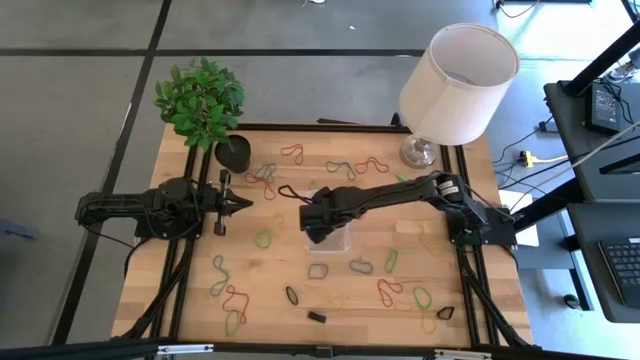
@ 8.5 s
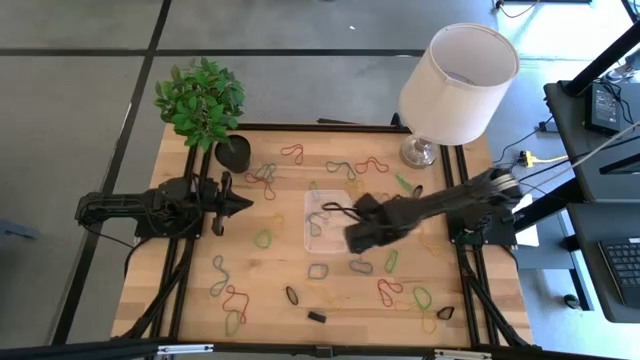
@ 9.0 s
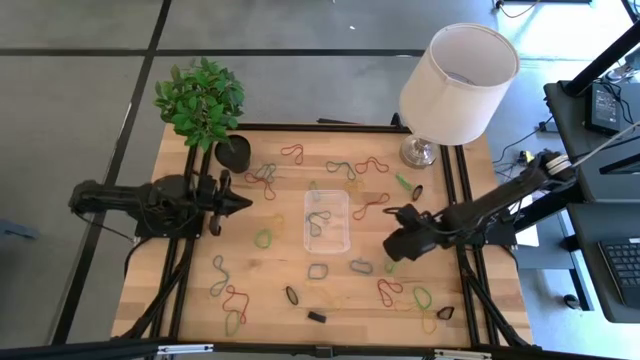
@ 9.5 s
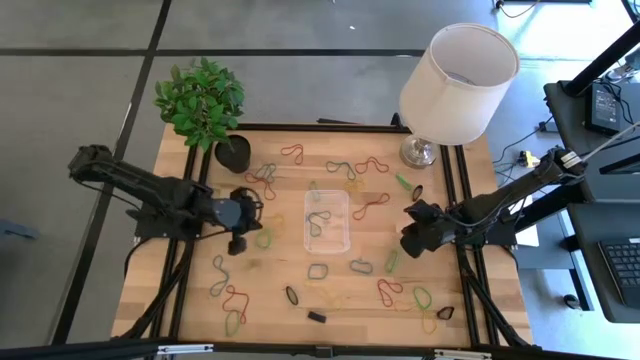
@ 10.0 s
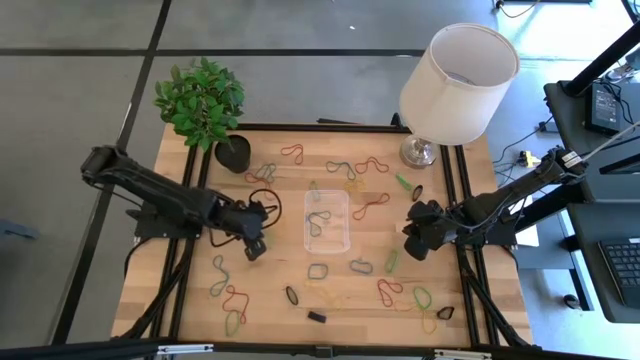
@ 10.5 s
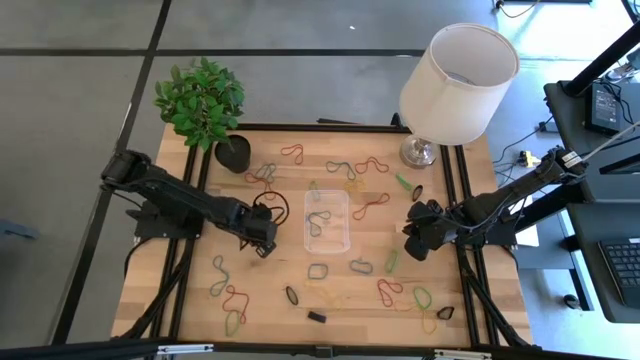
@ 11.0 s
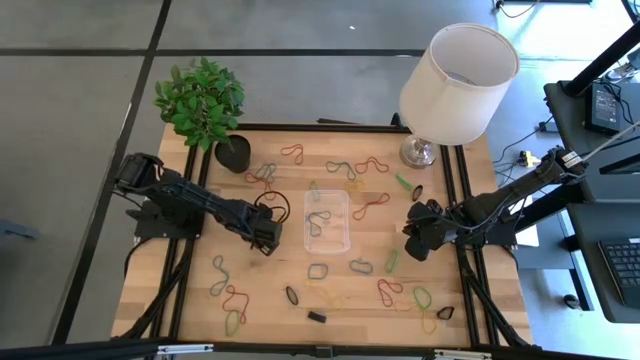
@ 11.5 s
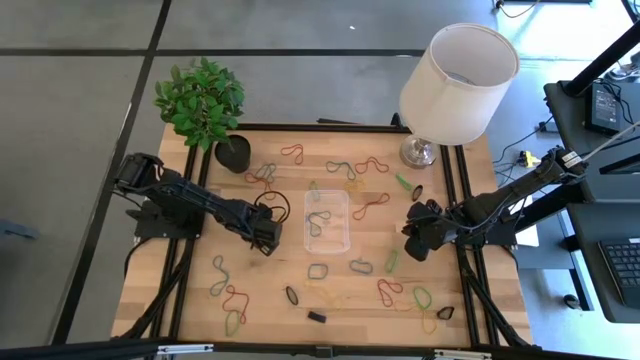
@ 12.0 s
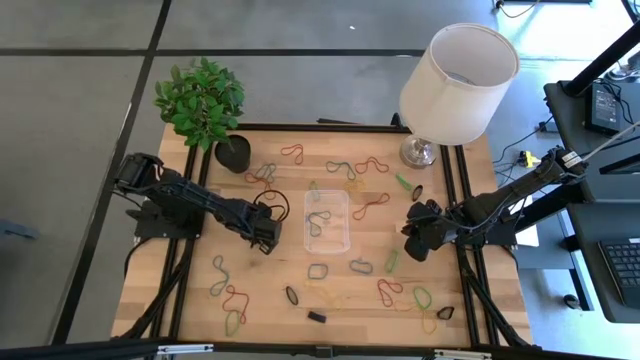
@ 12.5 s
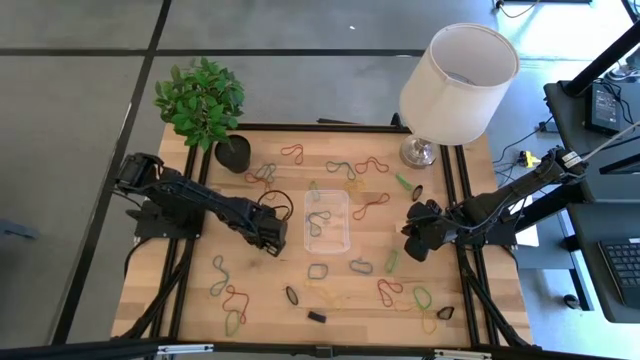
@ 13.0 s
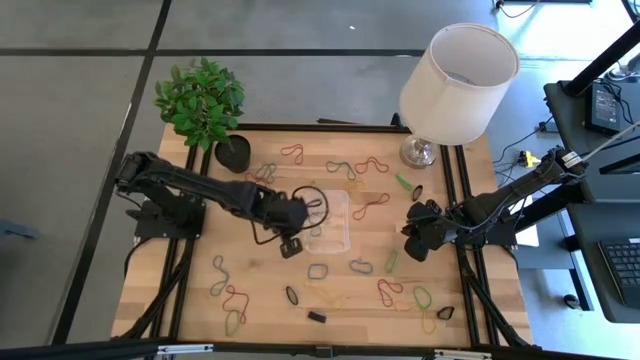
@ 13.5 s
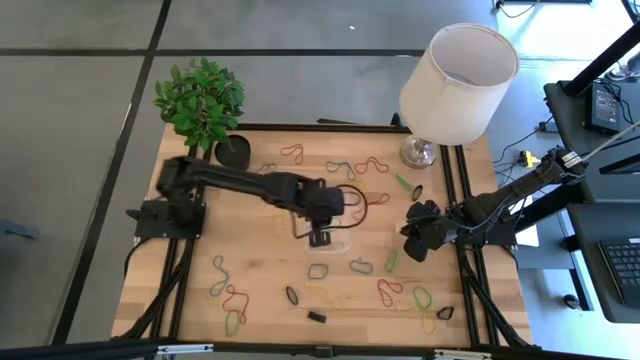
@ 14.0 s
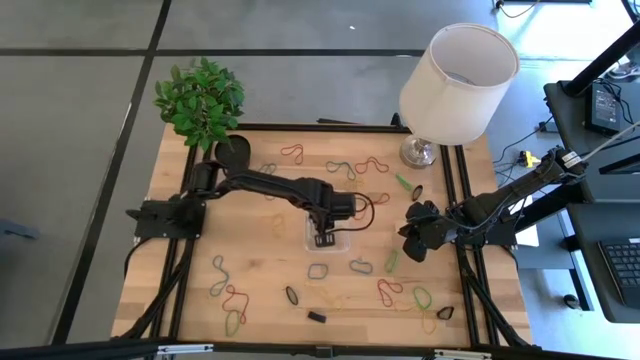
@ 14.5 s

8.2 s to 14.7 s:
Task: Pick and place rubber bands into bin
Put the green rubber band into the transparent container

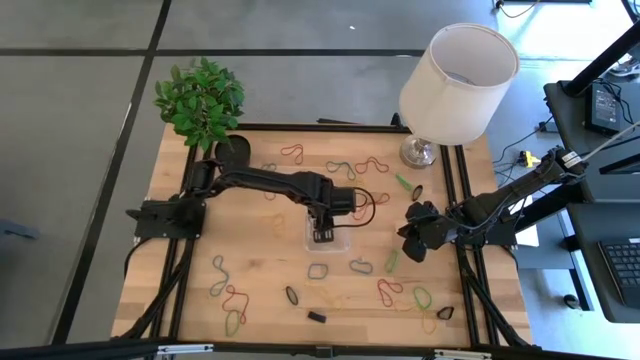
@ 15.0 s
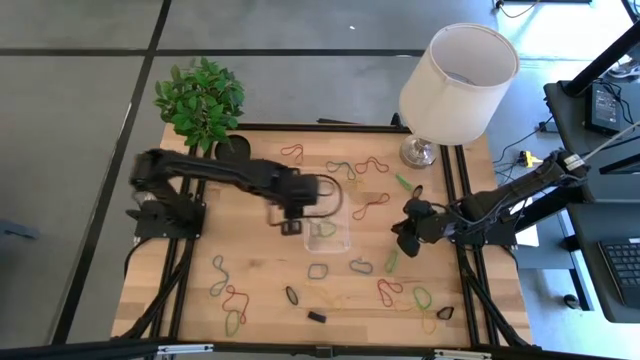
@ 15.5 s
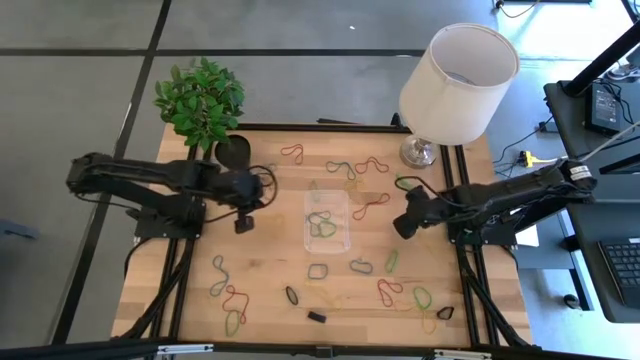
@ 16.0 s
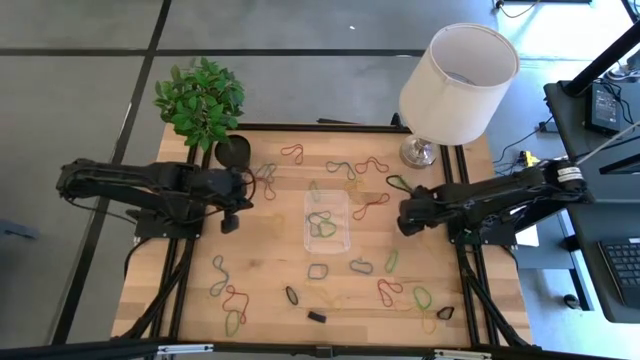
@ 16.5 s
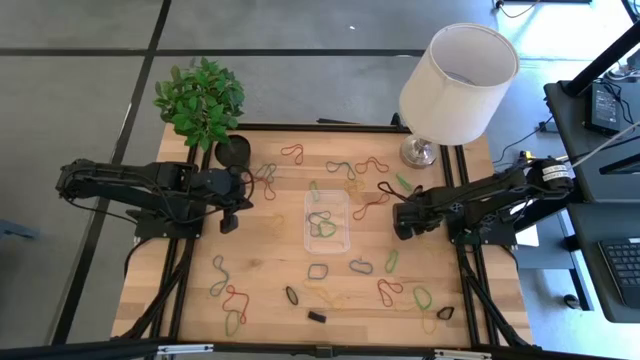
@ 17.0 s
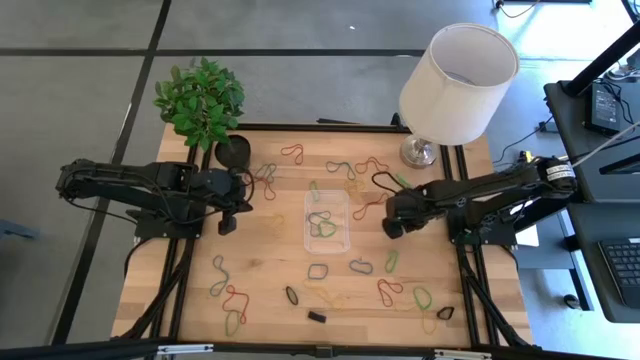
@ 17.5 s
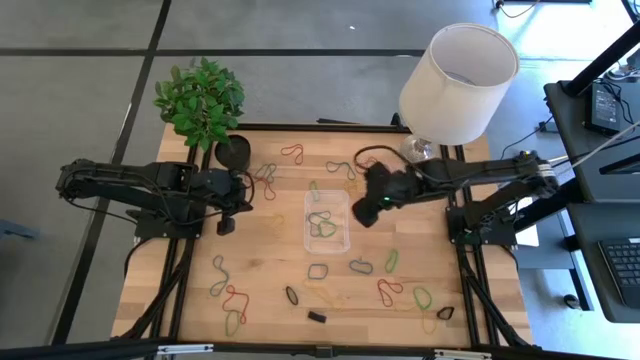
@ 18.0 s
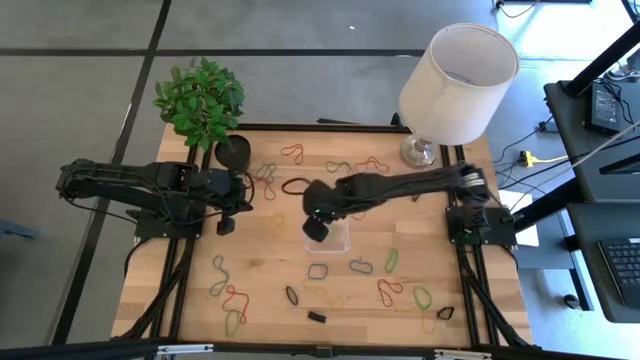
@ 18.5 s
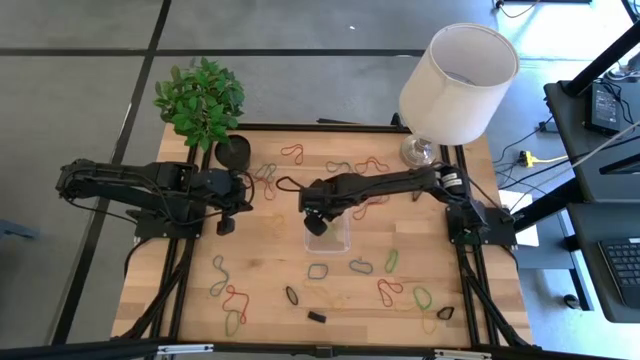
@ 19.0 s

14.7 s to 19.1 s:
Put the yellow rubber band into the transparent container

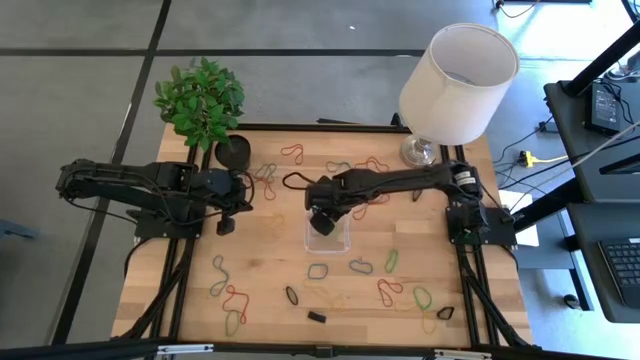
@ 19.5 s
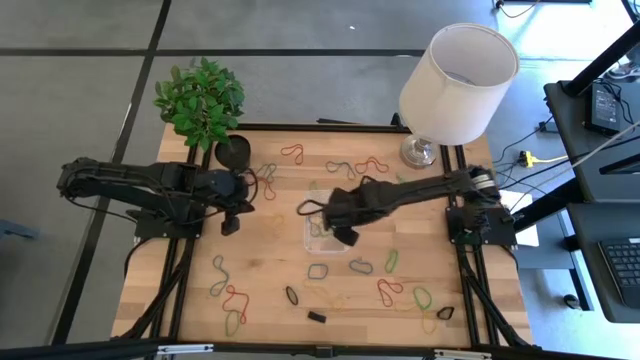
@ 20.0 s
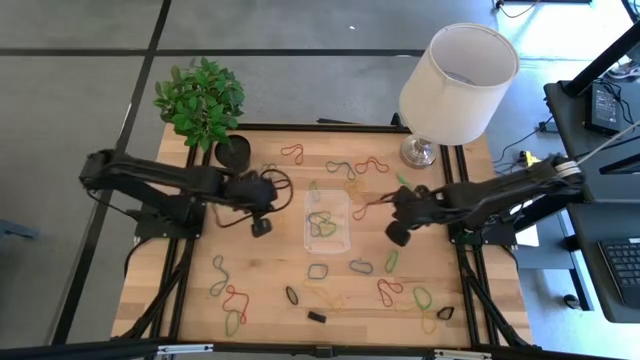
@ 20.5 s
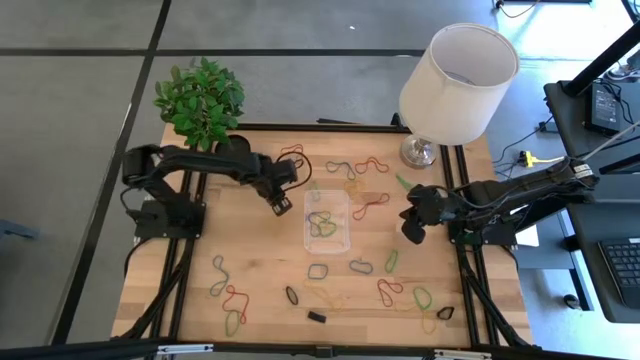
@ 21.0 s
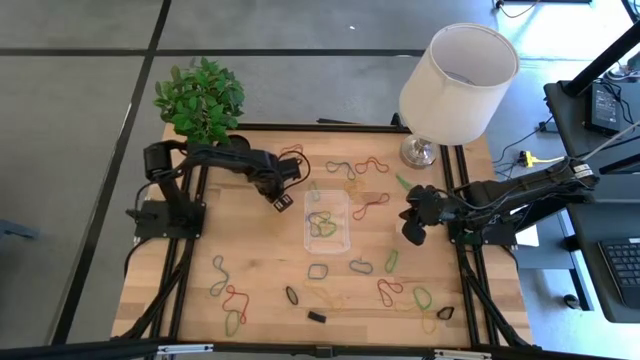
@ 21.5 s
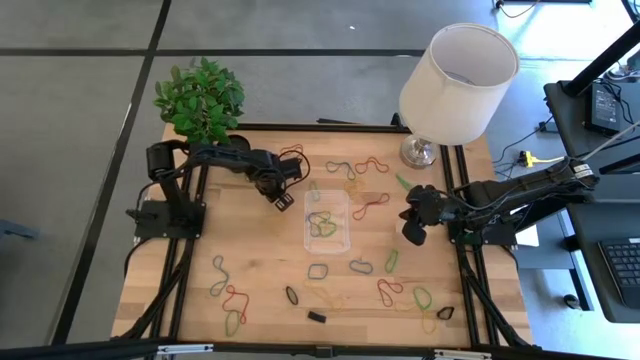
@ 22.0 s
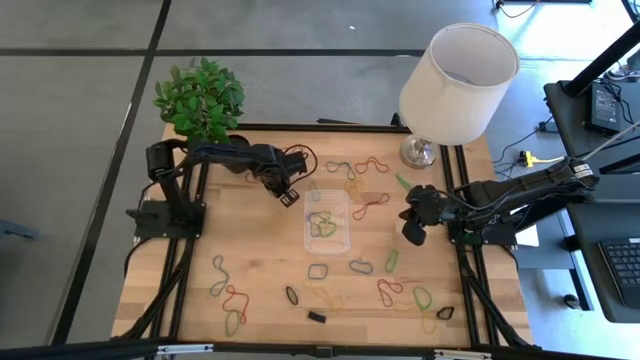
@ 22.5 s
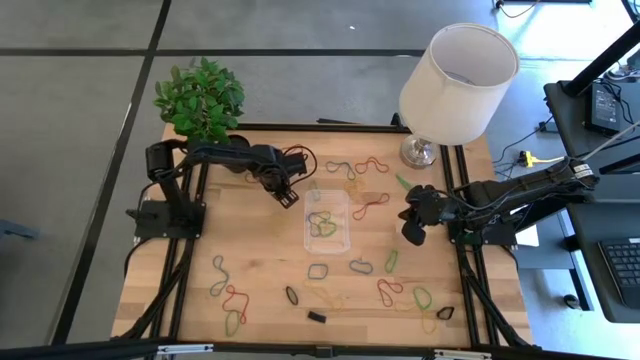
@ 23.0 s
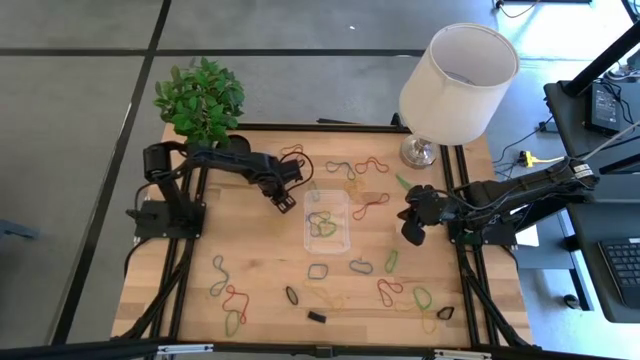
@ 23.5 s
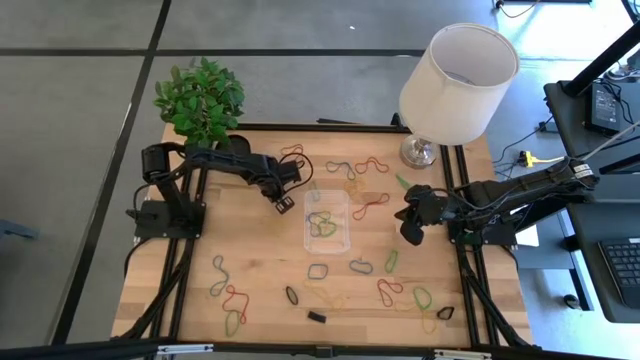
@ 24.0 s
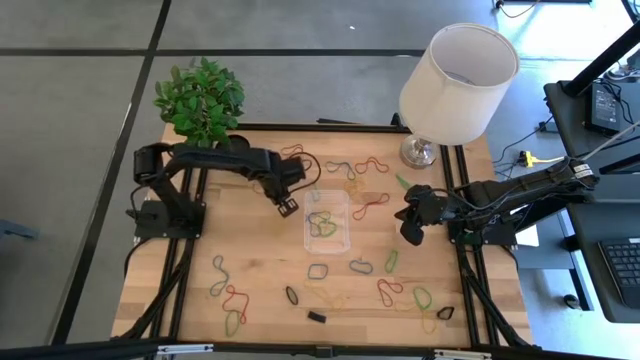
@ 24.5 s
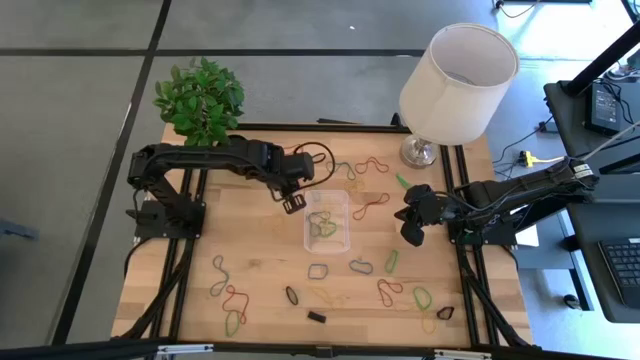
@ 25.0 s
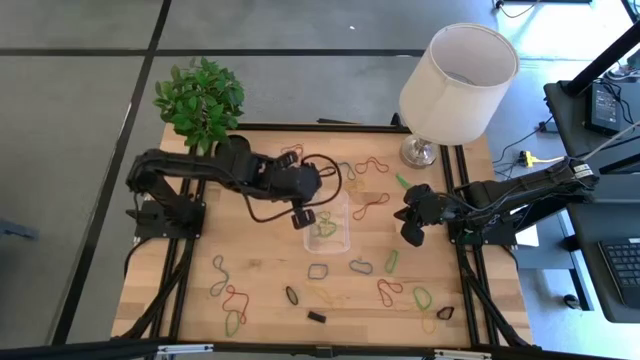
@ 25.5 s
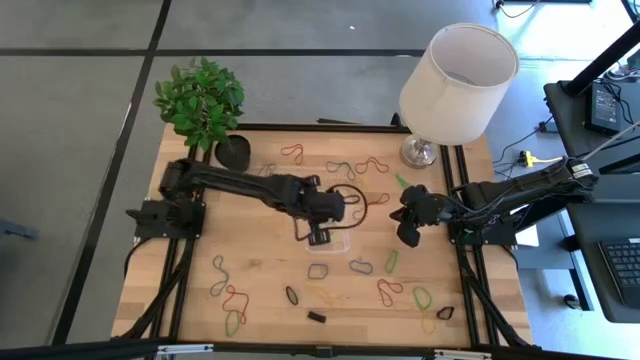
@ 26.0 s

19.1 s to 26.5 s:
Put the red rubber band into the transparent container

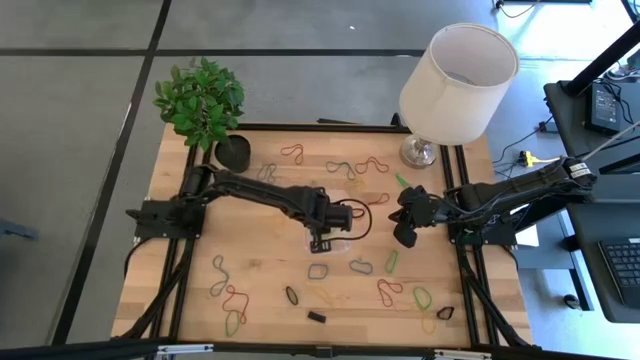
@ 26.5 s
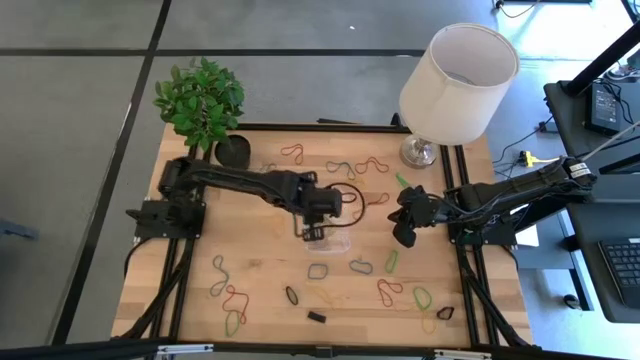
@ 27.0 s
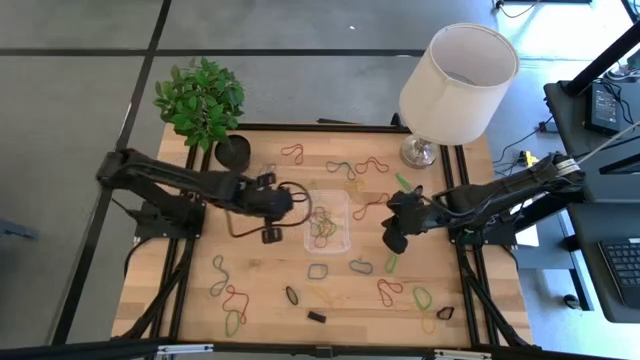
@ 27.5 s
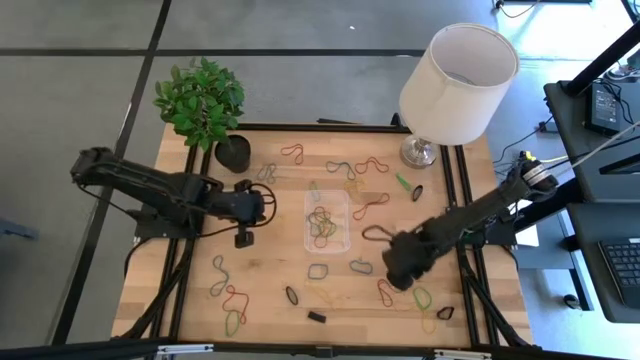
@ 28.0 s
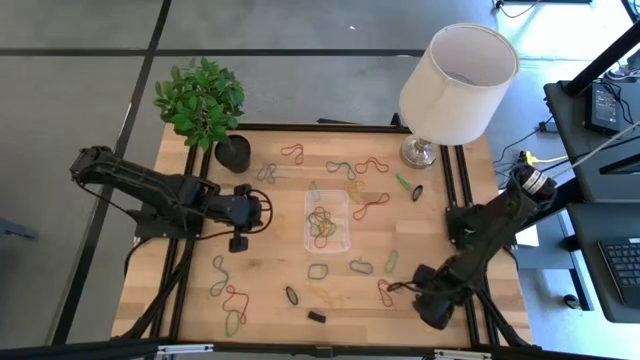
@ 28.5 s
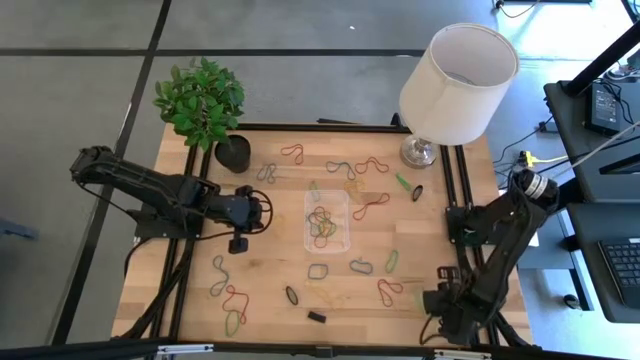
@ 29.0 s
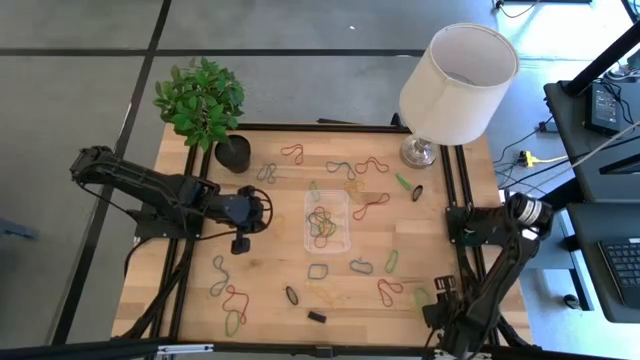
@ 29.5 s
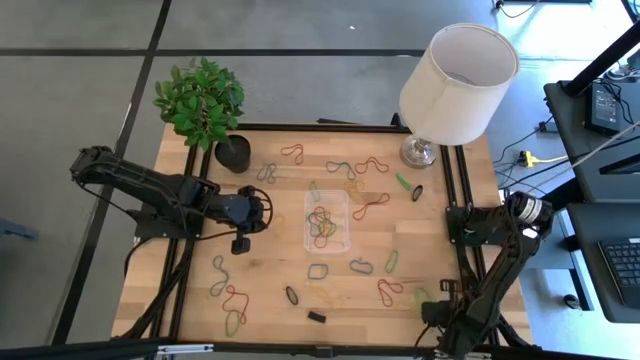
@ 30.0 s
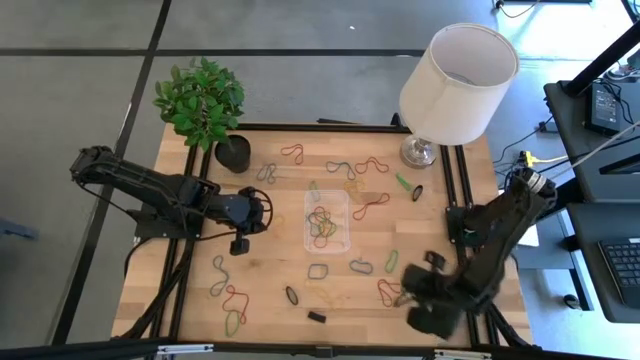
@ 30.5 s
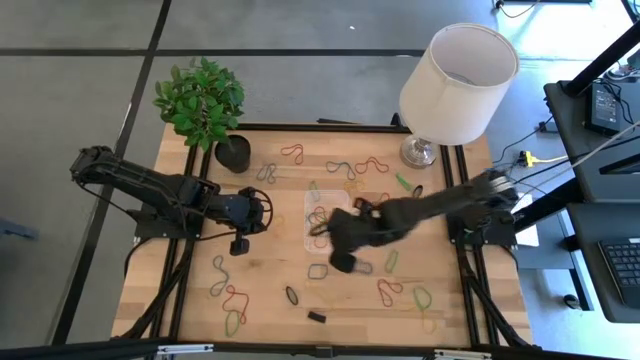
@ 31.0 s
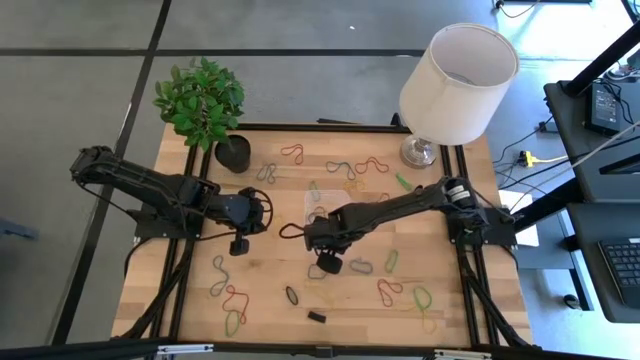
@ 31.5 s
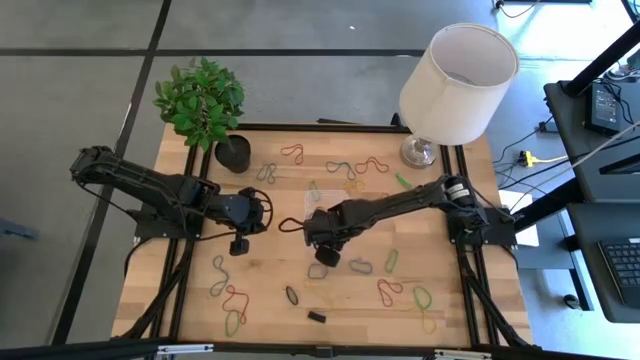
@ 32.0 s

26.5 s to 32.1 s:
Put the black rubber band into the transparent container
